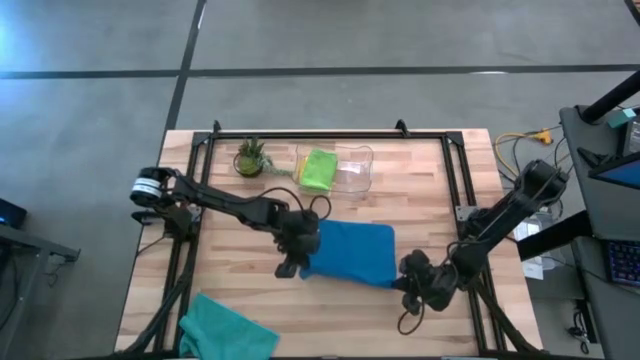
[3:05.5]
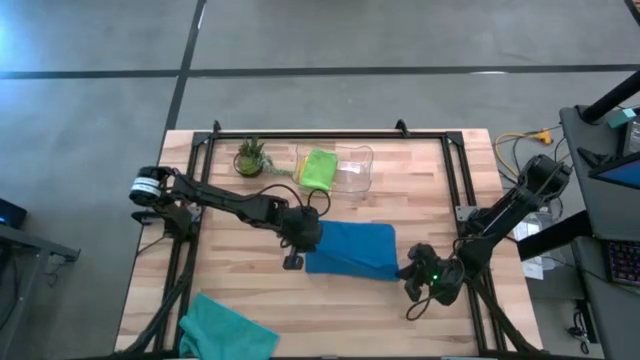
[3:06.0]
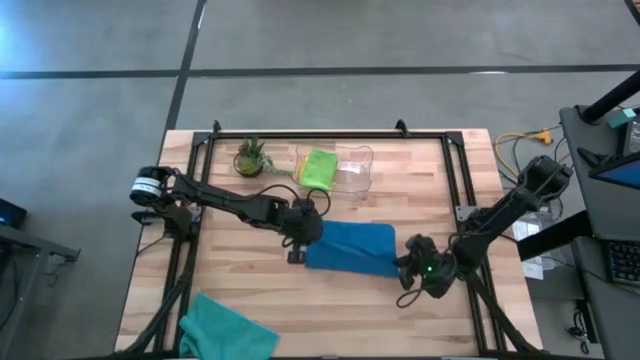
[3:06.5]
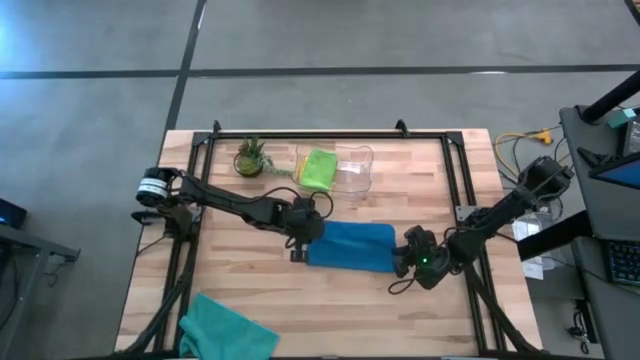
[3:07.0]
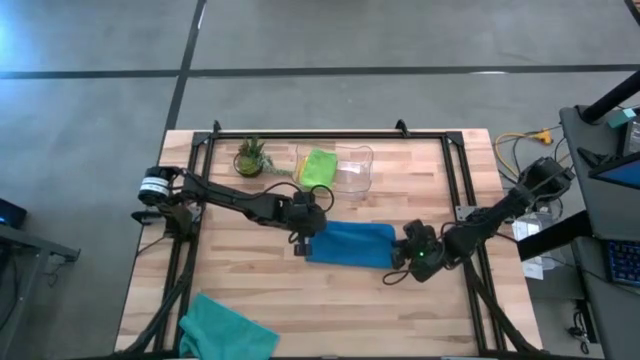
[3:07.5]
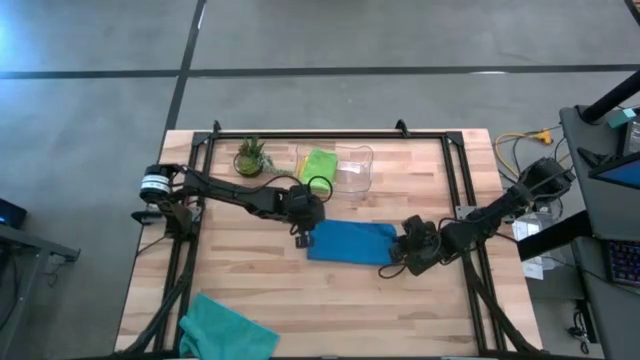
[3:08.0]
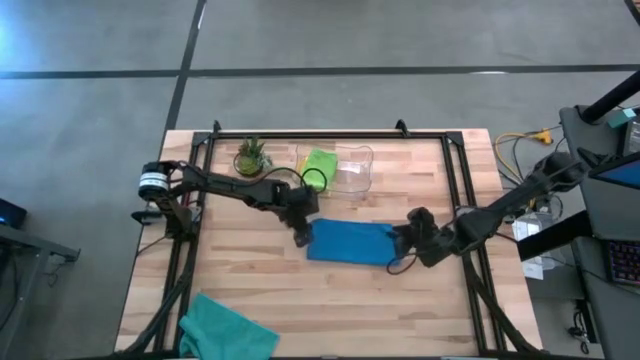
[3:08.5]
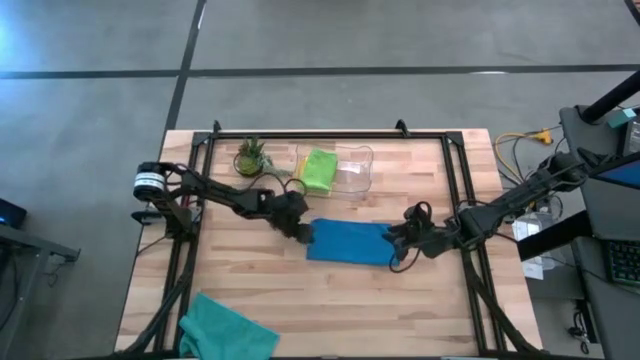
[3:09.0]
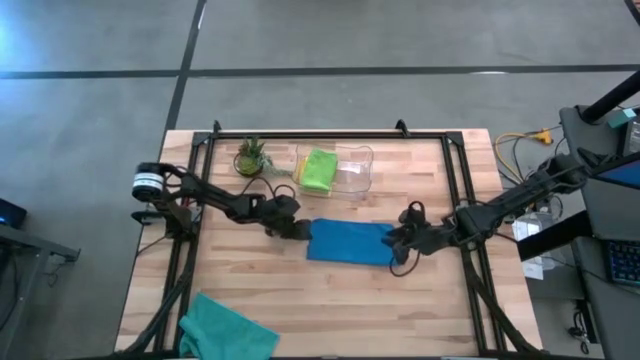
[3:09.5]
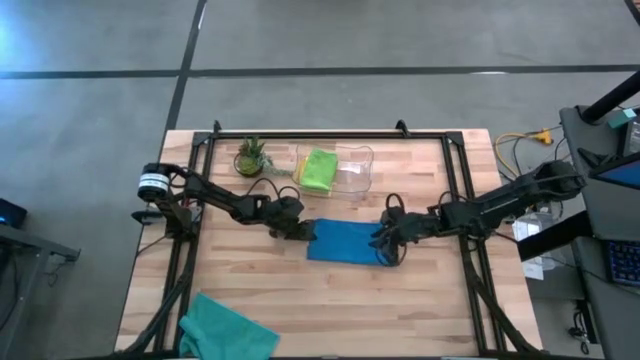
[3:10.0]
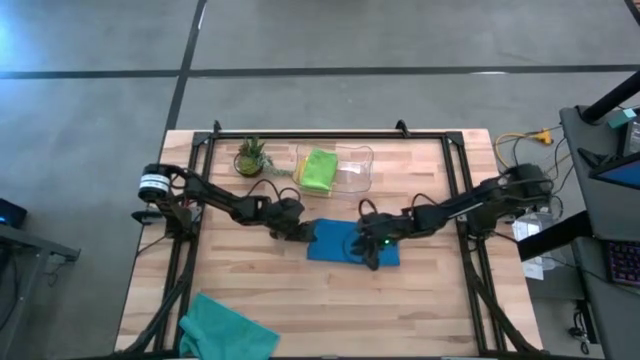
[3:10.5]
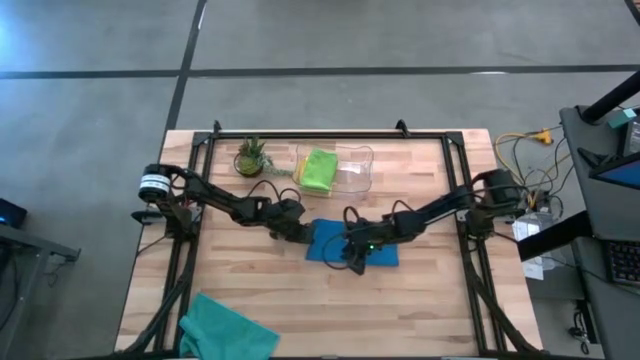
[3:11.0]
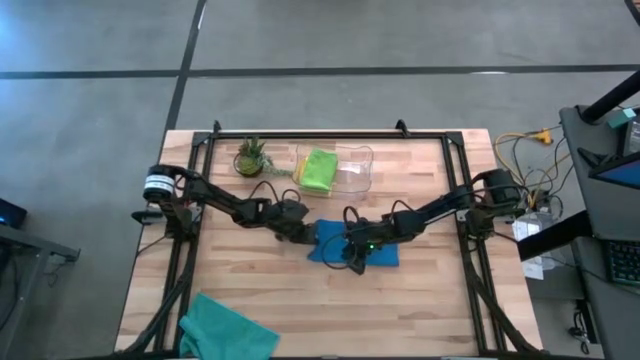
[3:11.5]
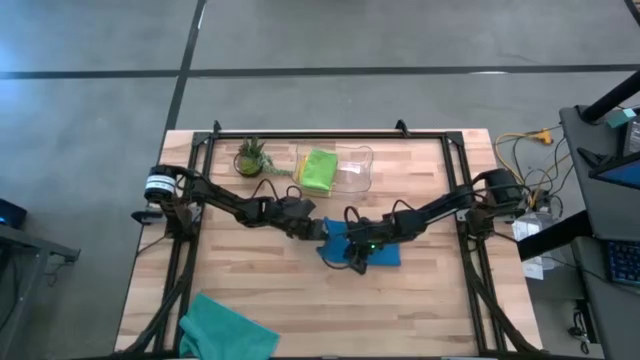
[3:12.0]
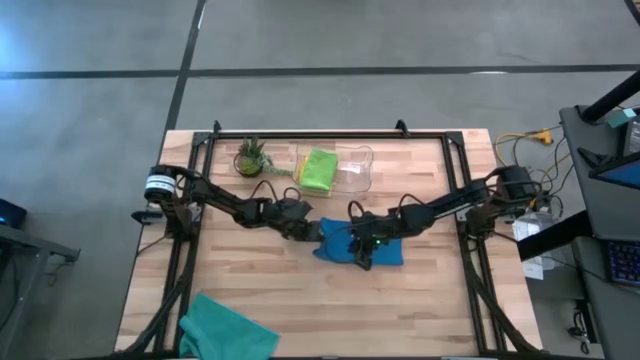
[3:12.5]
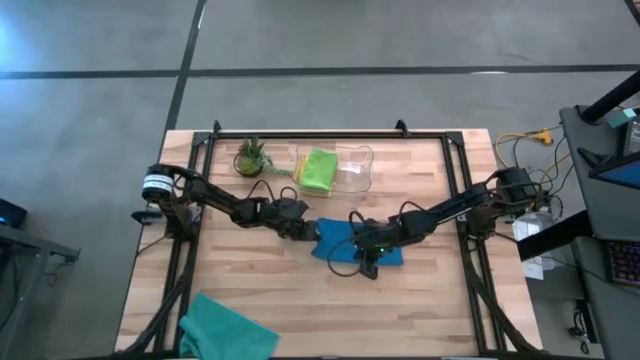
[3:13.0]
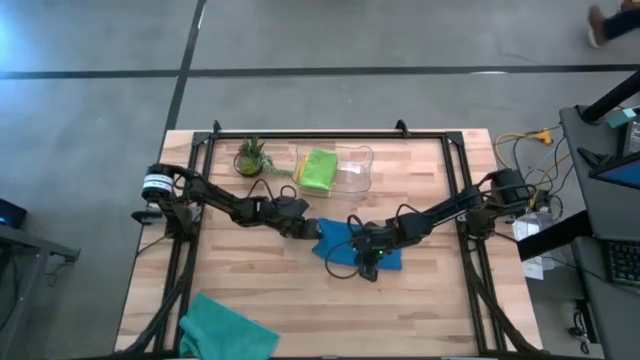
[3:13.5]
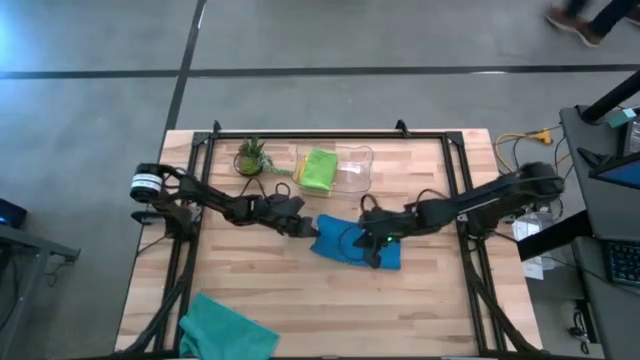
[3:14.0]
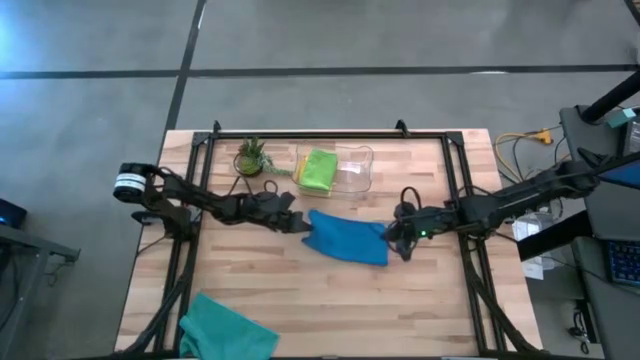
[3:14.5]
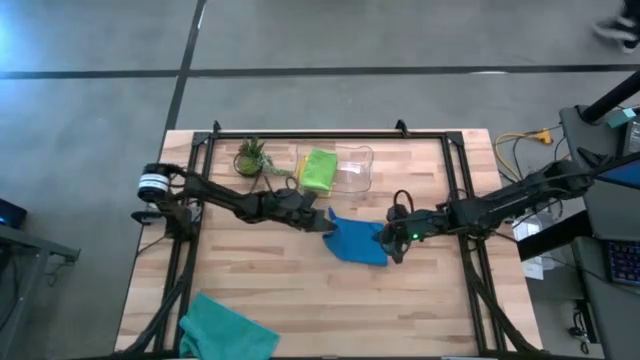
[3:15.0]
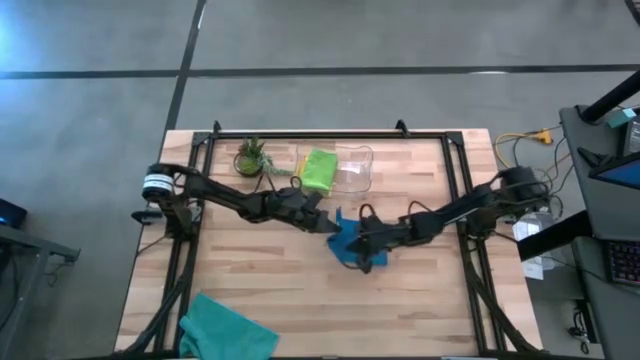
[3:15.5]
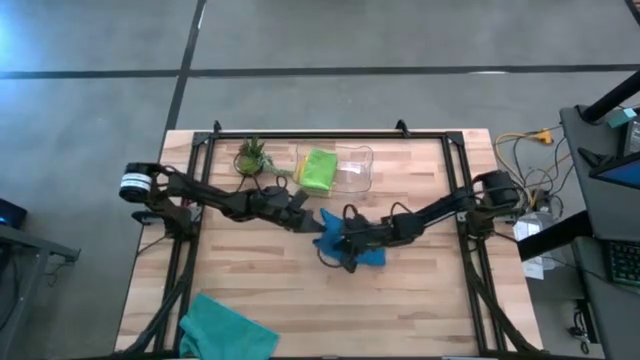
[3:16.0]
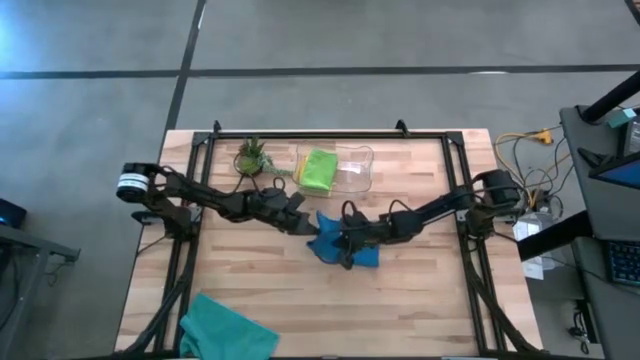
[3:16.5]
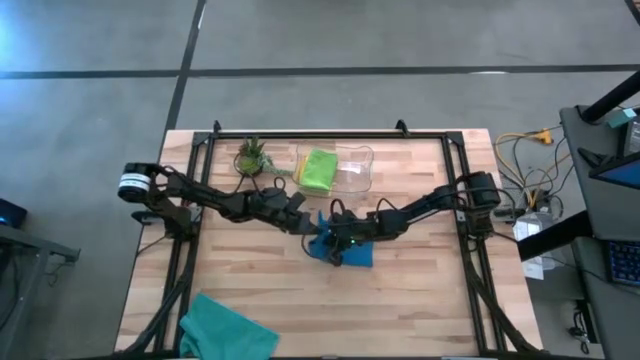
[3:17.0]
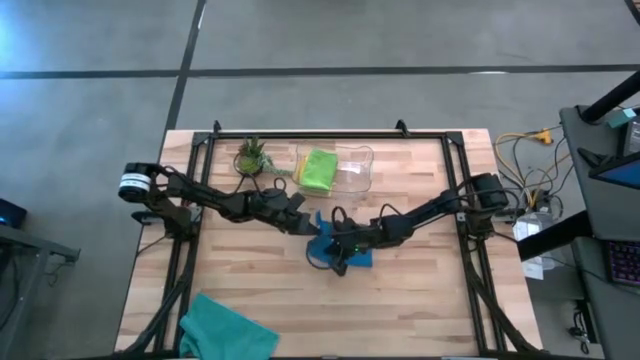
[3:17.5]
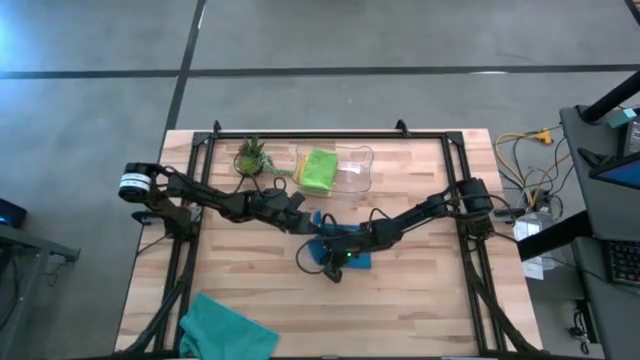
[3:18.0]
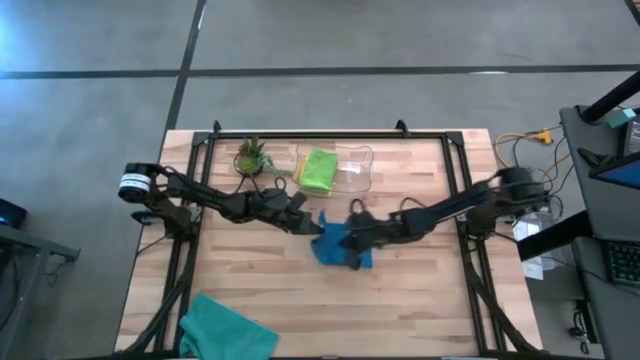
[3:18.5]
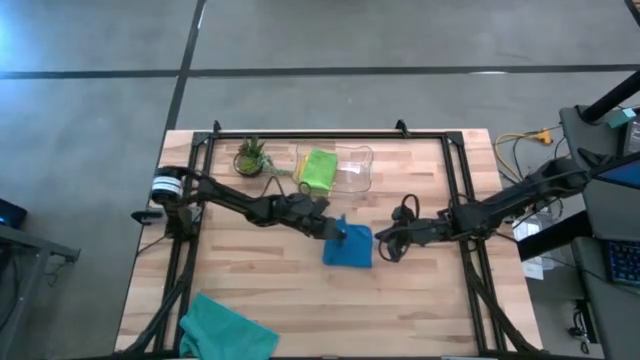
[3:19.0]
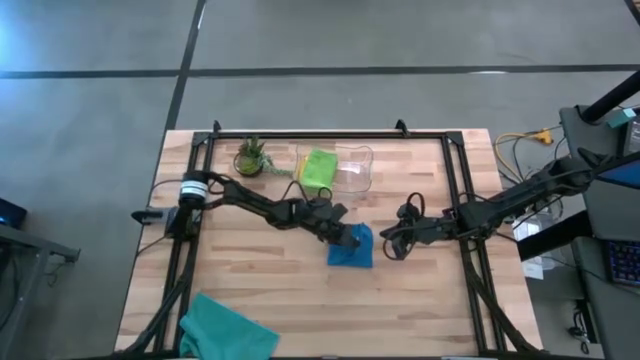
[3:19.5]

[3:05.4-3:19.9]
Task: Fold microfiber towels
Fold the blue microfiber towel

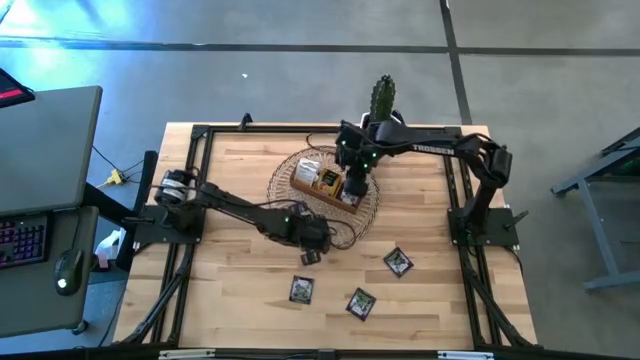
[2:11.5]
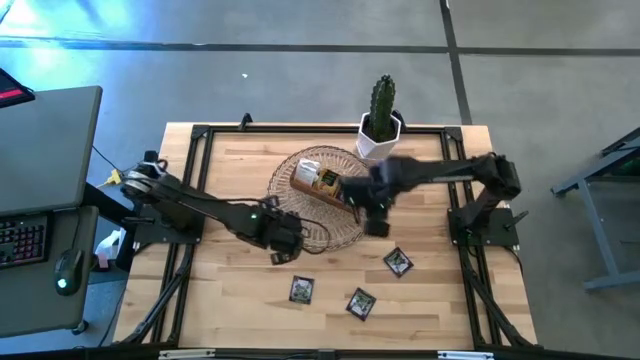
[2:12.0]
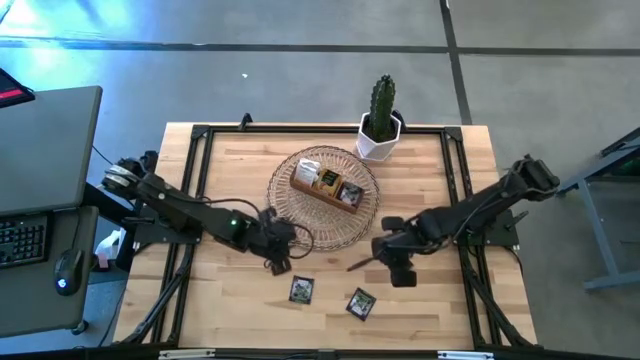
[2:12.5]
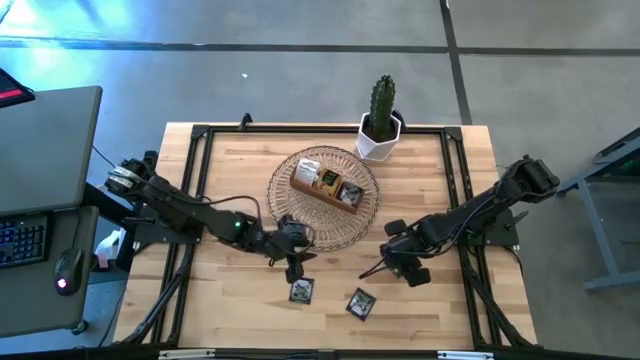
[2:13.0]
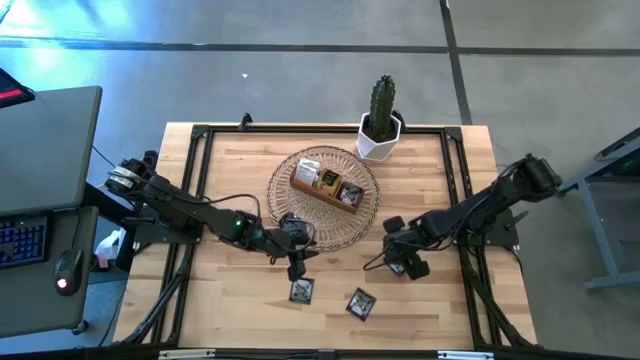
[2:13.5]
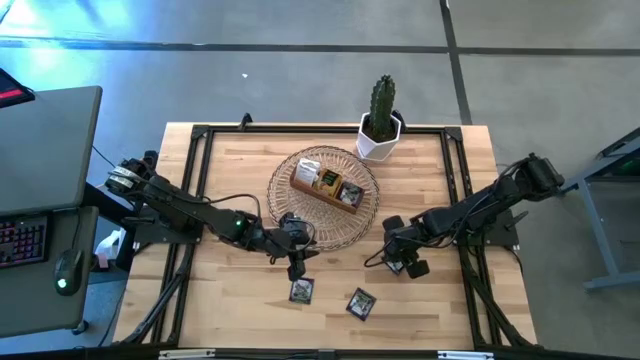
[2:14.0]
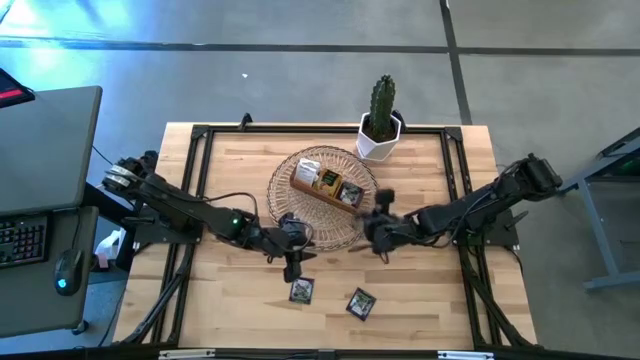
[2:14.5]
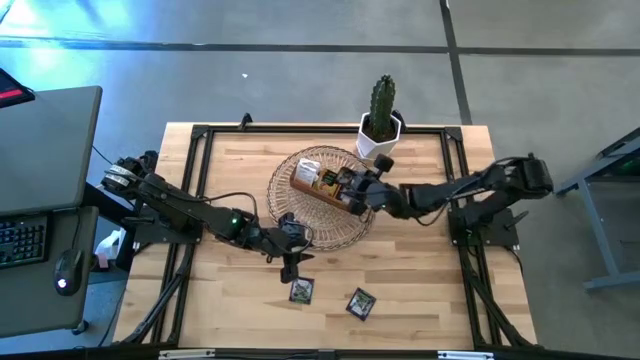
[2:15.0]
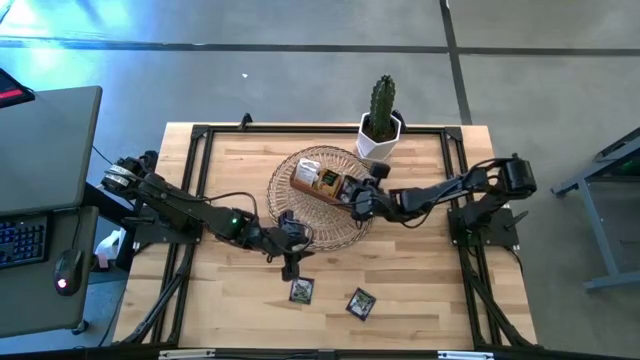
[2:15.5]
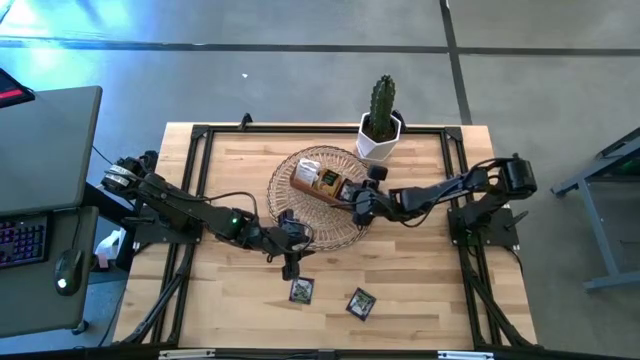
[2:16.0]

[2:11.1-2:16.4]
Task: Pick & Place Tea
Put the purple tea pack into the right section of the wooden organizer
